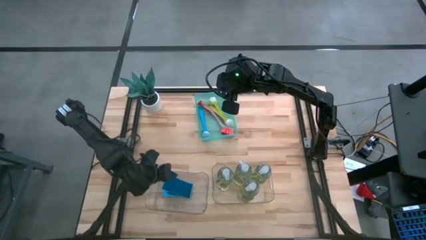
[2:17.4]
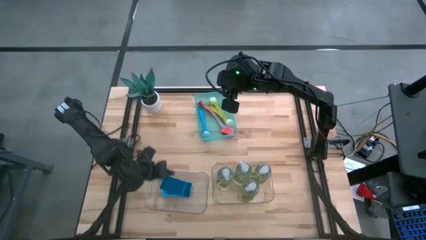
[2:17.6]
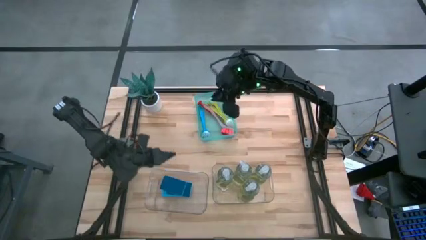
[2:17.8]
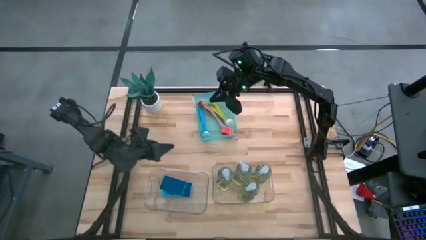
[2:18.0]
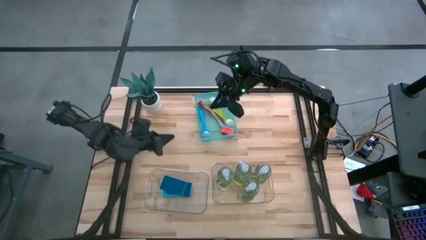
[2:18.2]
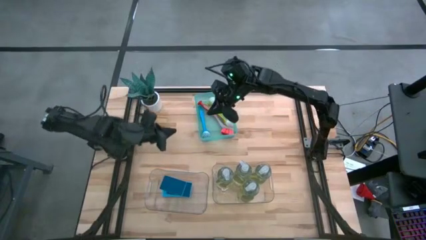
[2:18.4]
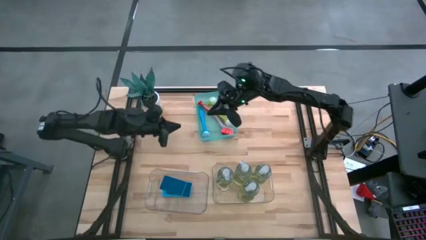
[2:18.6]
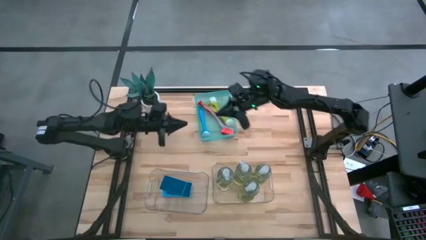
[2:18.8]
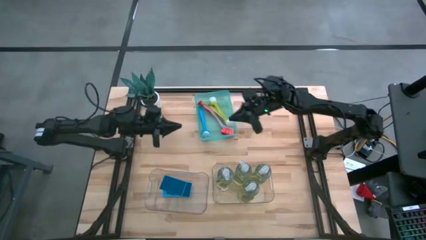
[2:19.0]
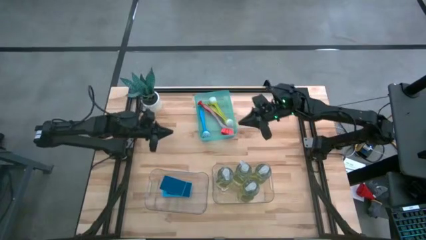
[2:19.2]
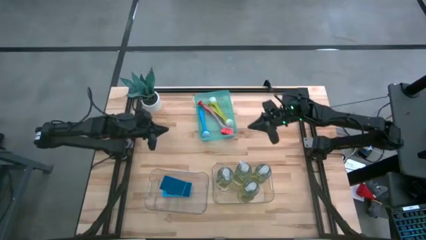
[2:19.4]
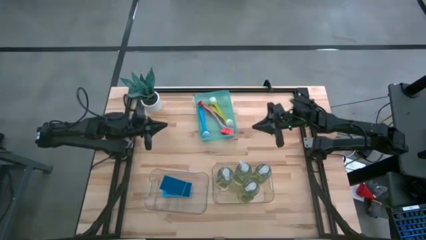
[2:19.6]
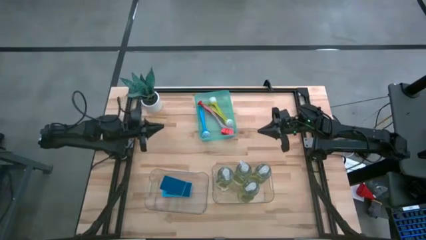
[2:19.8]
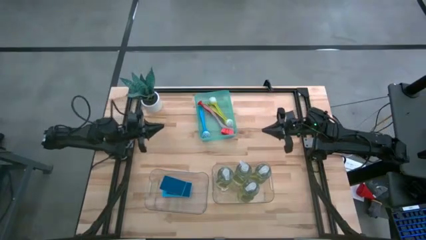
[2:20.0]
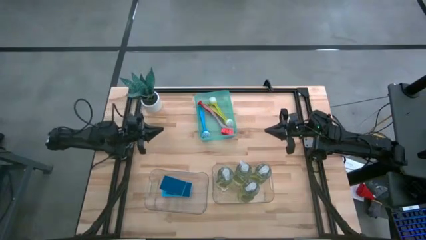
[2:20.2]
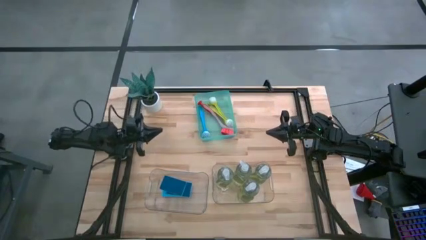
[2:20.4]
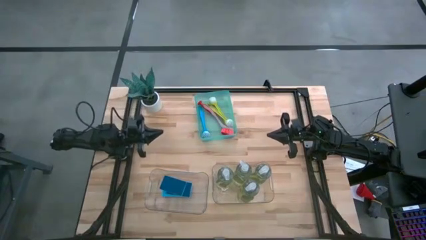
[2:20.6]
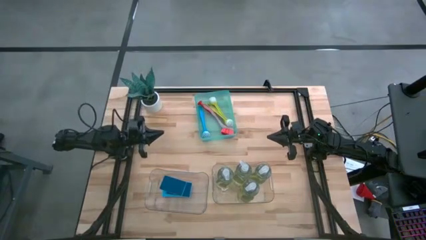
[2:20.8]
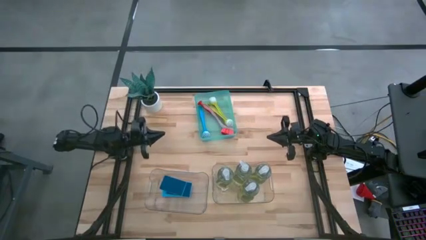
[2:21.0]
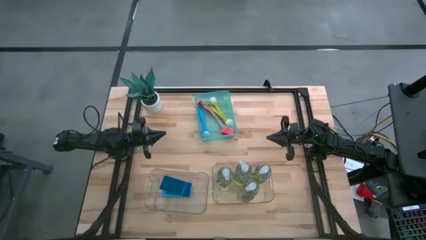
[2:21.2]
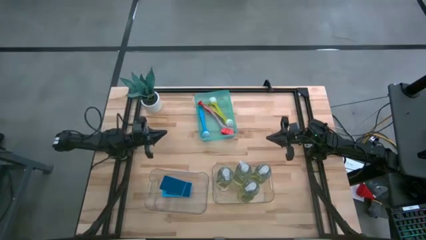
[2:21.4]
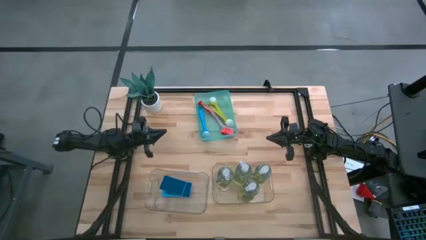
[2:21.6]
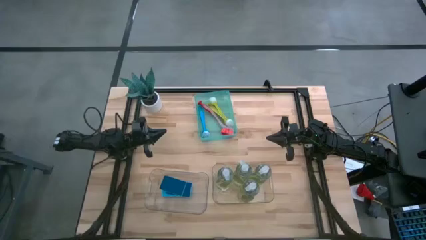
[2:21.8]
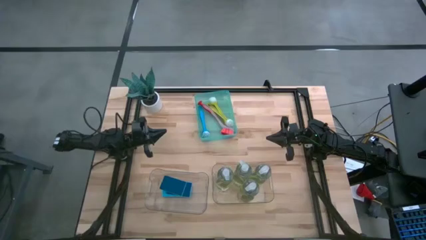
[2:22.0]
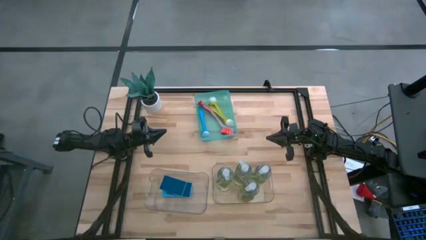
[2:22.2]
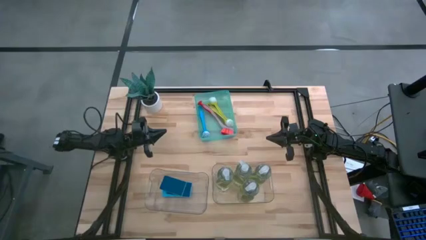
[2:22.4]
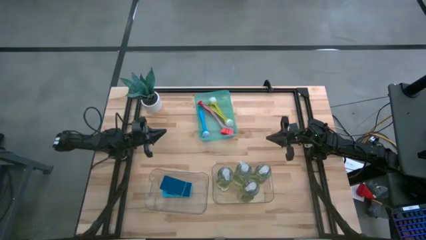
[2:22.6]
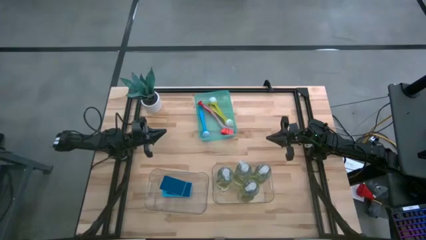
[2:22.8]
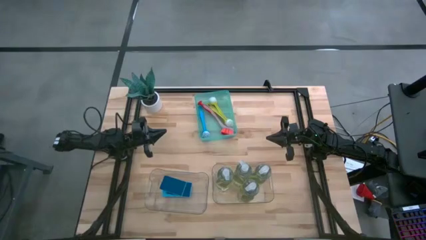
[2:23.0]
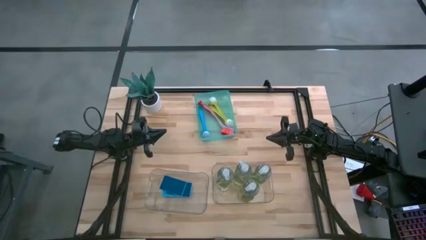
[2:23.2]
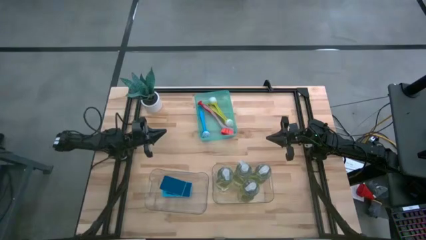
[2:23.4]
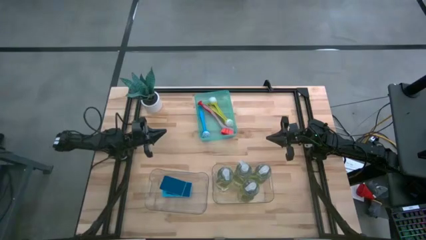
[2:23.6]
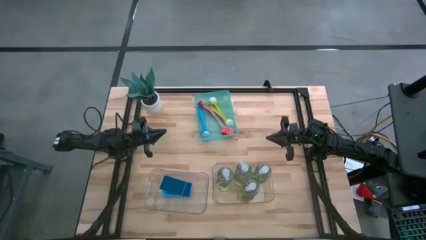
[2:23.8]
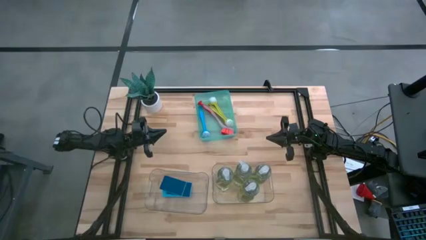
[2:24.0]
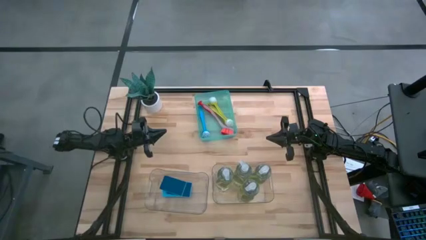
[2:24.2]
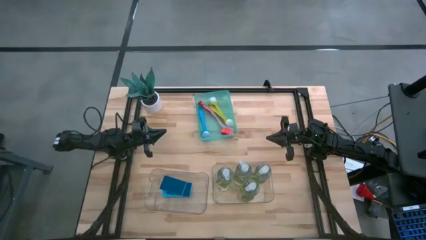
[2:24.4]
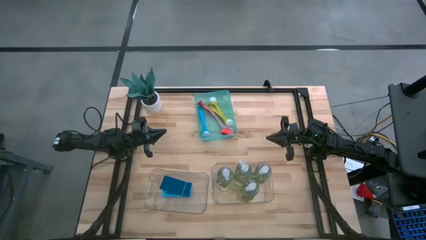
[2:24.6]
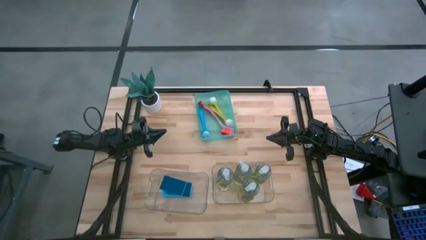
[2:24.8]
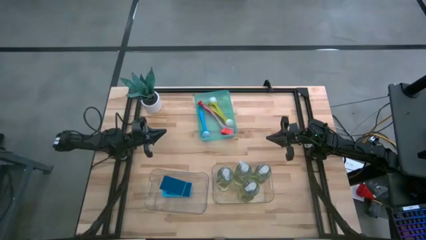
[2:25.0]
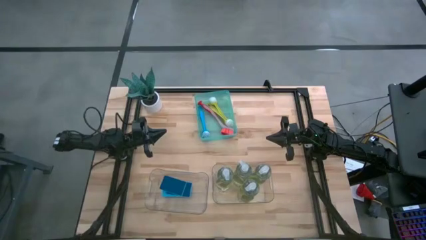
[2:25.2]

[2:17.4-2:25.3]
Task: Pick & Place Kitchen Sink Supplies
Return to Home Position

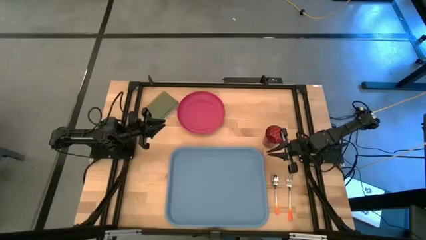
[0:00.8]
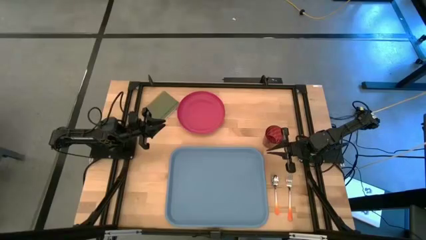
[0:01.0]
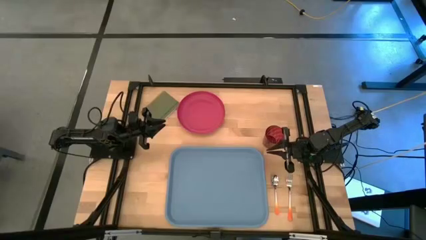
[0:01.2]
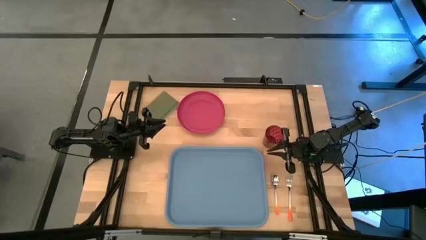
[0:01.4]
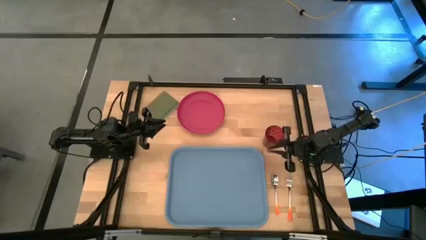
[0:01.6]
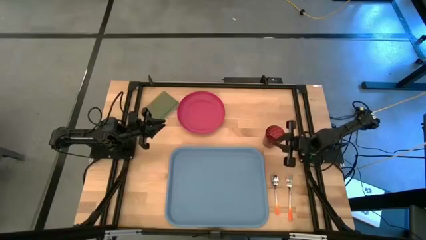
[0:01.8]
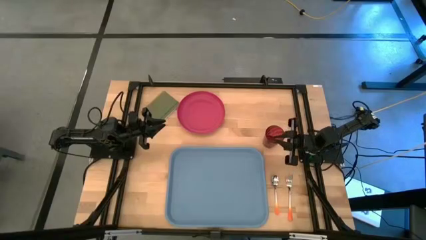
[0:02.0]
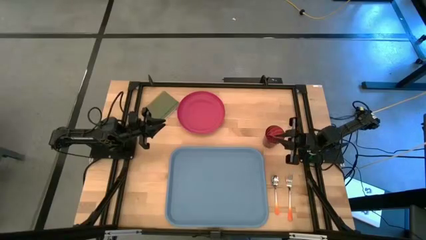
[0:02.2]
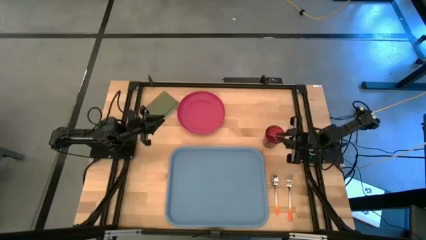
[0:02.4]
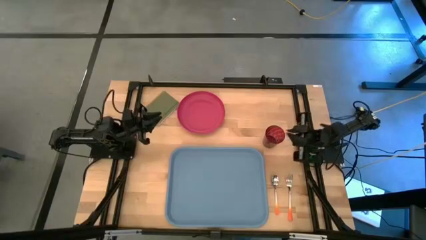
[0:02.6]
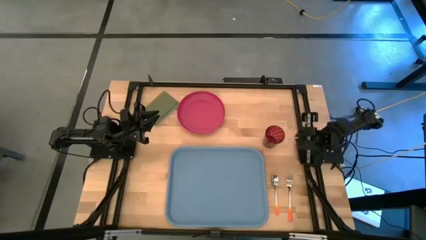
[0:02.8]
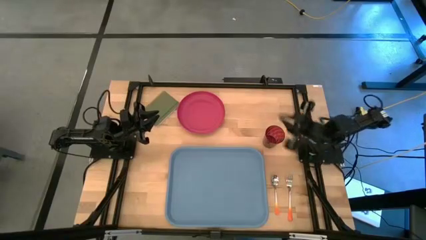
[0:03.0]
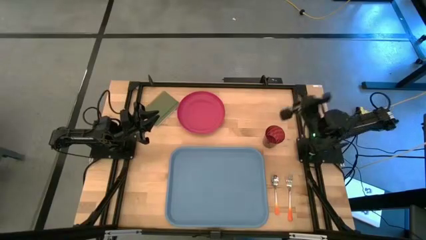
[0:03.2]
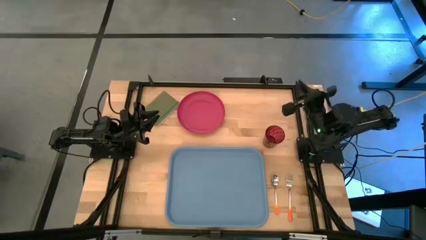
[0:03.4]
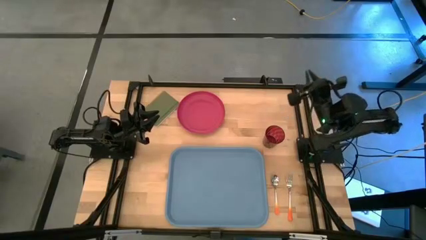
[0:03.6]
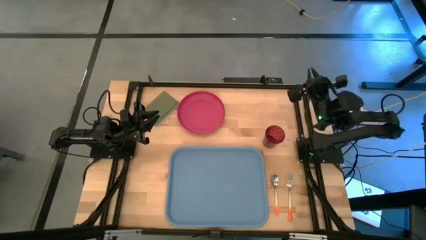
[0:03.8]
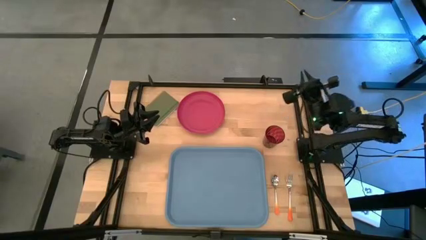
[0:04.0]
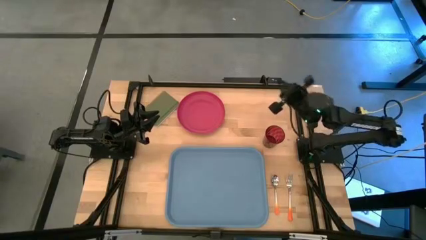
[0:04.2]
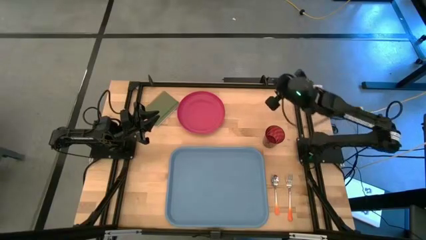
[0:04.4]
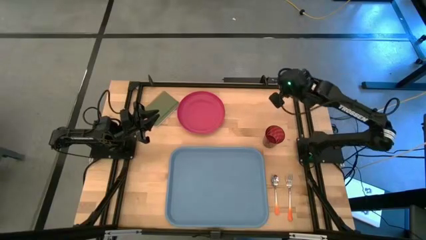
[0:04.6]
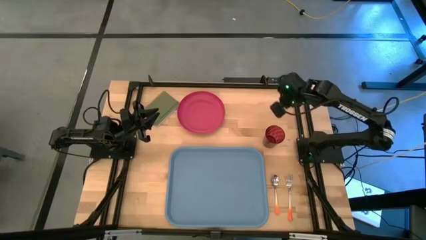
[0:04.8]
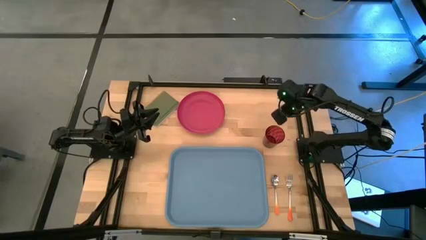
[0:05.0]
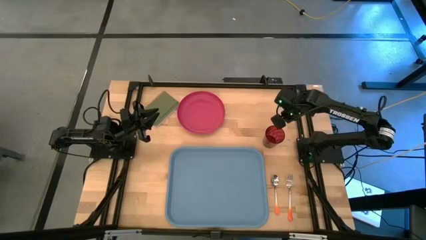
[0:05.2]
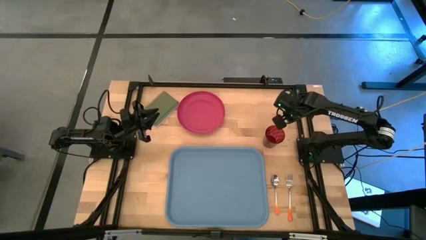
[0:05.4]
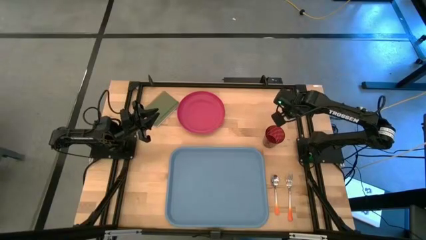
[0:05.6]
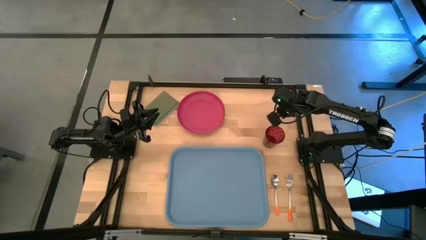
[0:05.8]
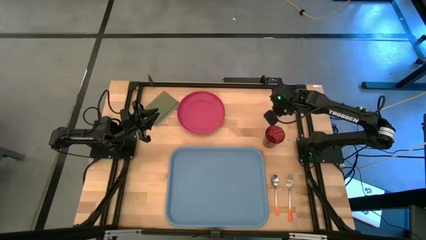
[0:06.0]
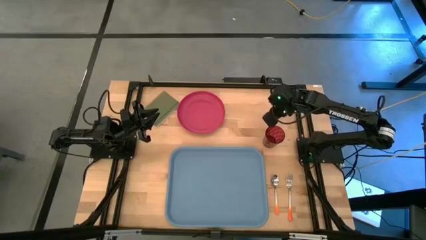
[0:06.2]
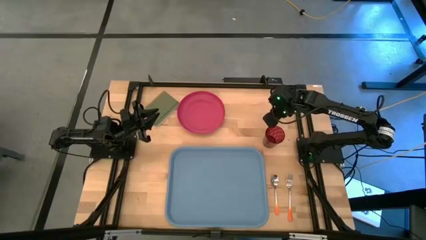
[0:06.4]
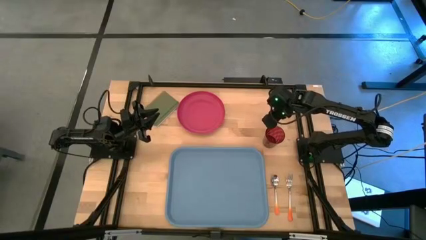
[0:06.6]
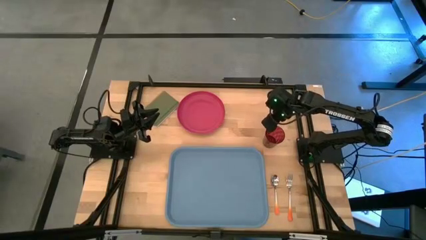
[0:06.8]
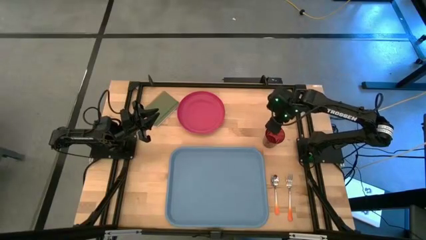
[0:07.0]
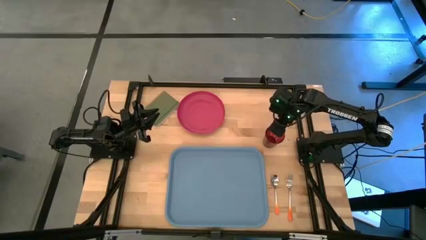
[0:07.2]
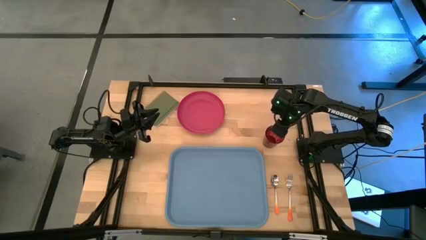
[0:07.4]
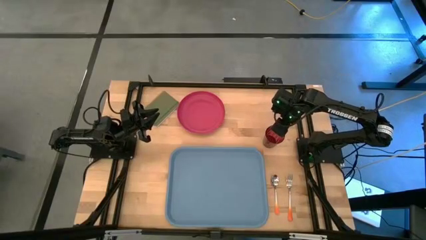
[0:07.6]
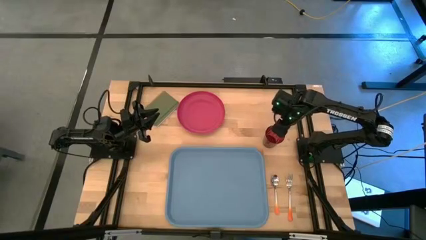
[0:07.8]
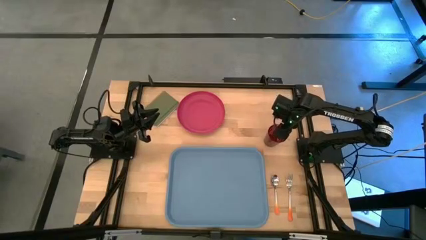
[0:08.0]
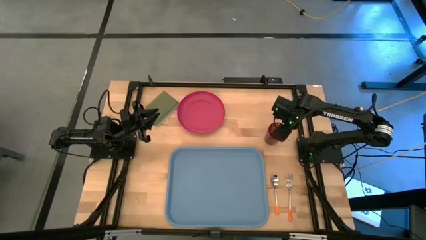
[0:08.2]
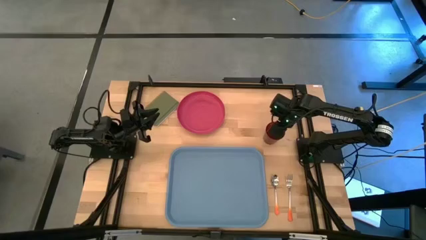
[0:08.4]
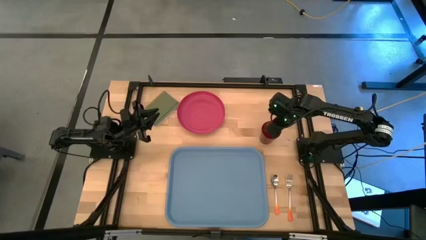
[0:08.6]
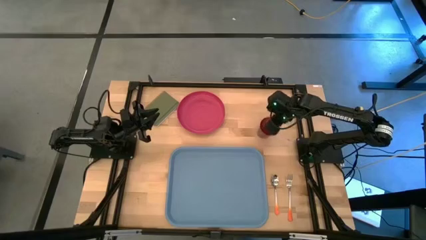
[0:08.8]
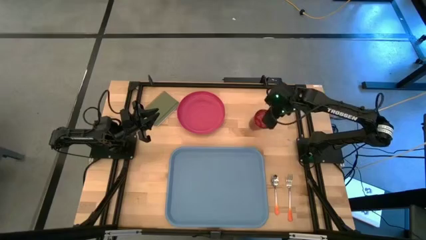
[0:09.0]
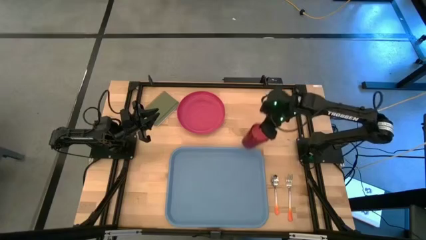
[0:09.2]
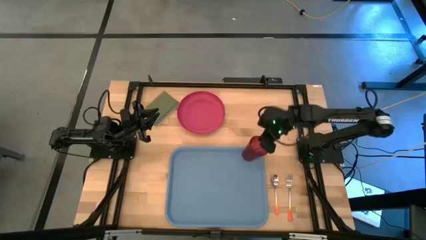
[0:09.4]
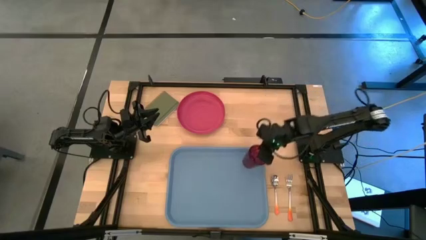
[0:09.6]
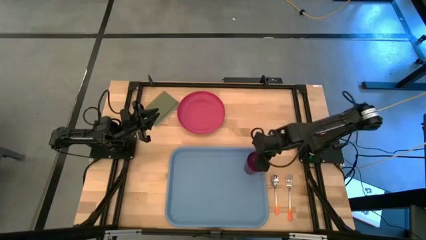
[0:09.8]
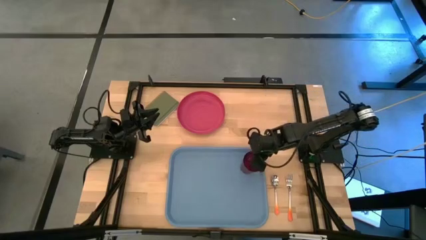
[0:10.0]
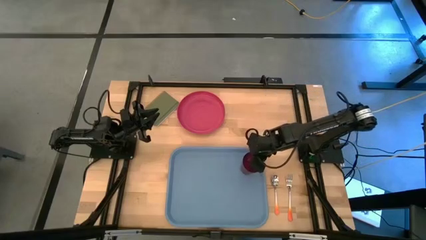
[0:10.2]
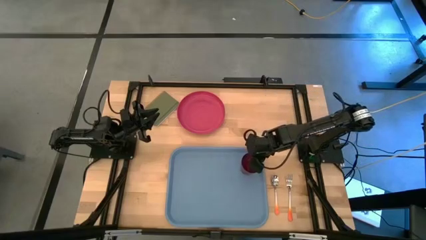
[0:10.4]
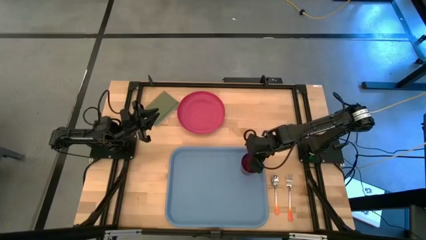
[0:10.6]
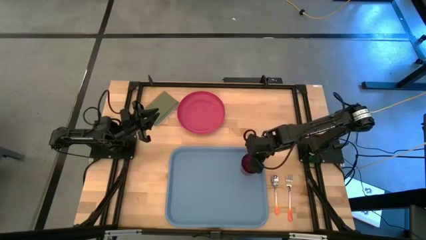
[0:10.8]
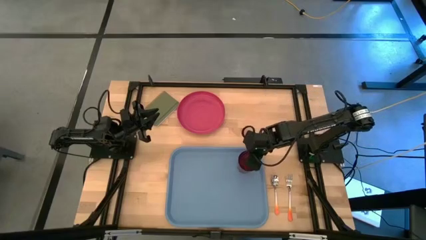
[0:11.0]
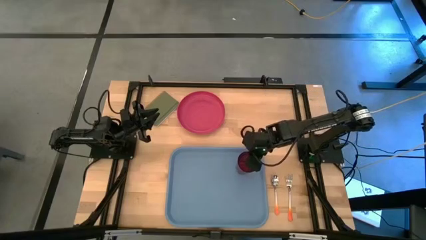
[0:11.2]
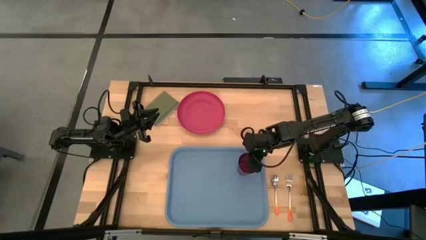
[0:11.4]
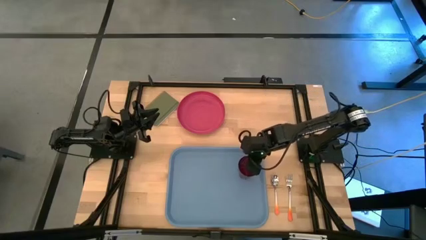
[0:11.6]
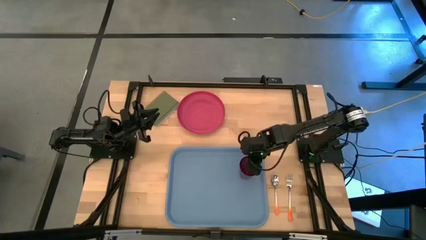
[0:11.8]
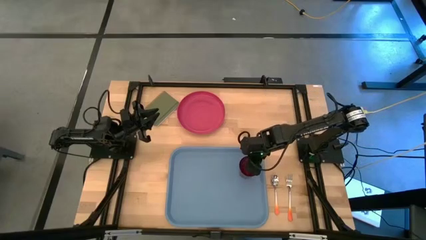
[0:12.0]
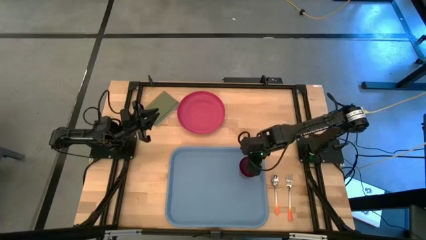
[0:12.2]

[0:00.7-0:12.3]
Task: Pick and place plate/cup/fork/spoon on tray
Put the red cup on the blue tray
